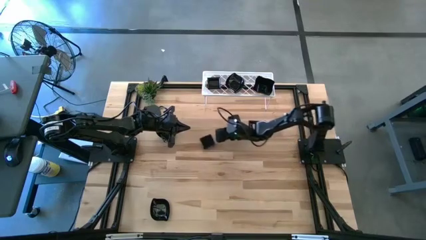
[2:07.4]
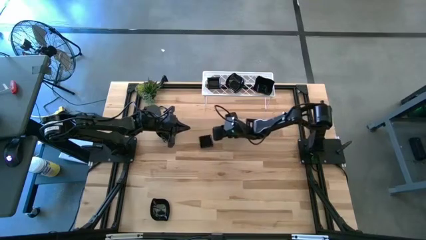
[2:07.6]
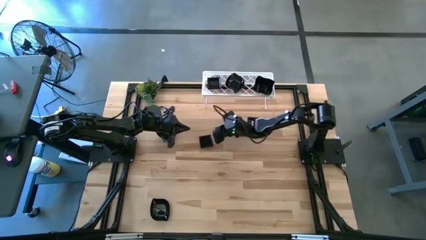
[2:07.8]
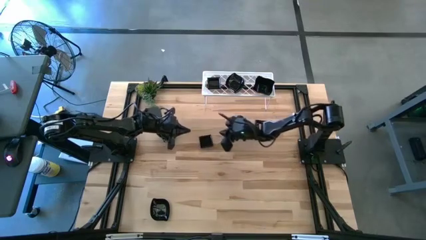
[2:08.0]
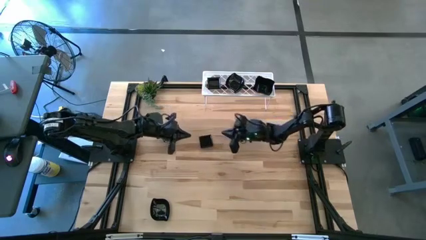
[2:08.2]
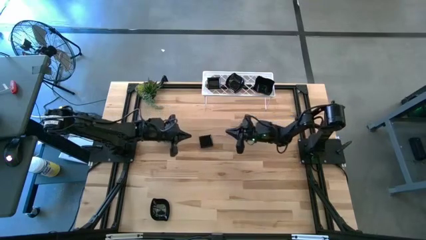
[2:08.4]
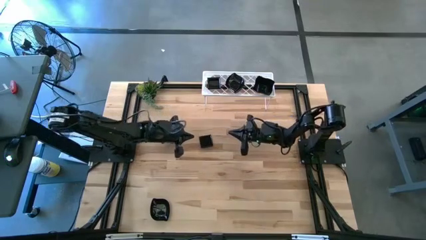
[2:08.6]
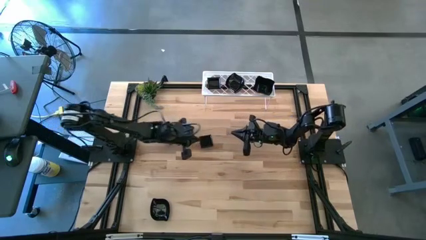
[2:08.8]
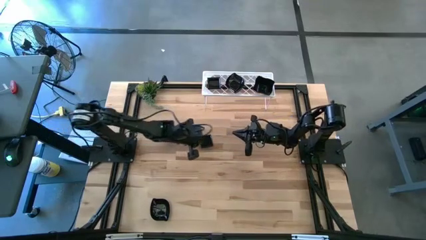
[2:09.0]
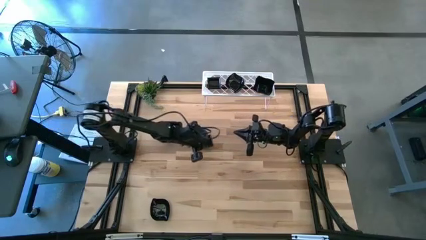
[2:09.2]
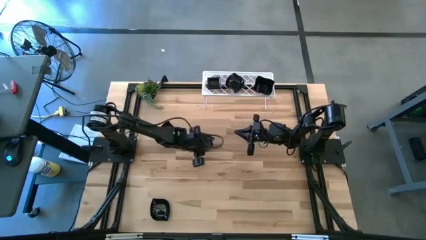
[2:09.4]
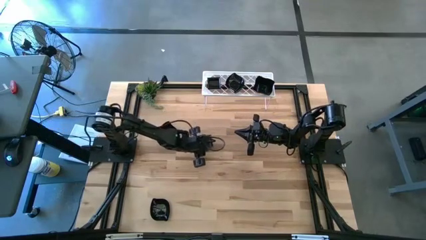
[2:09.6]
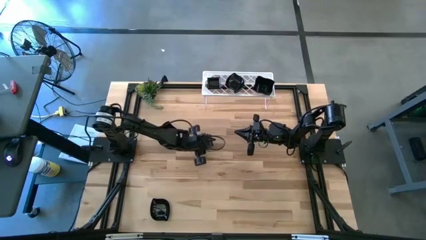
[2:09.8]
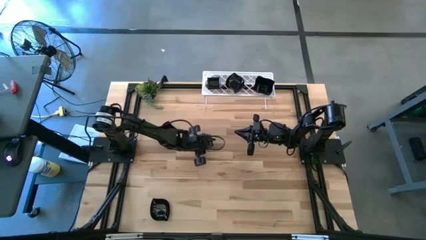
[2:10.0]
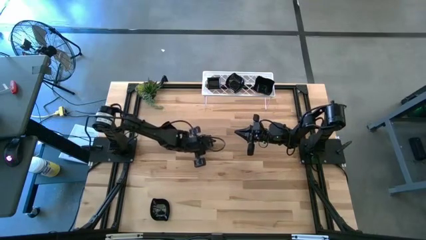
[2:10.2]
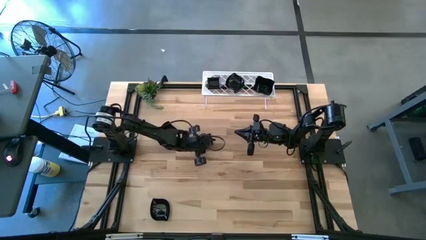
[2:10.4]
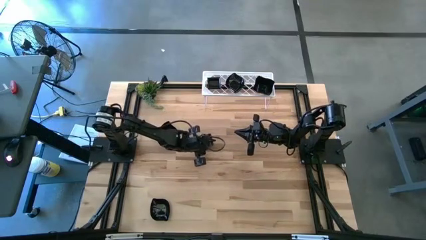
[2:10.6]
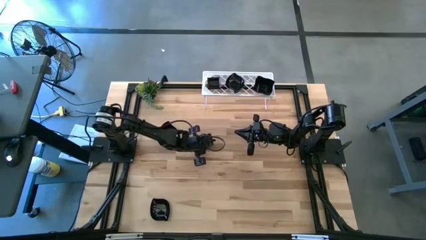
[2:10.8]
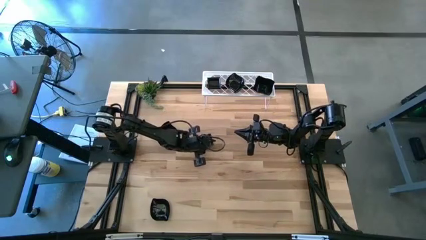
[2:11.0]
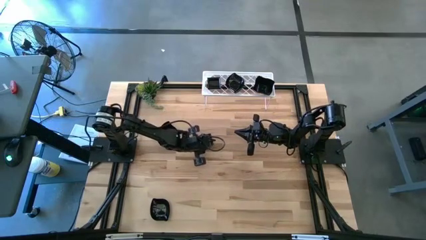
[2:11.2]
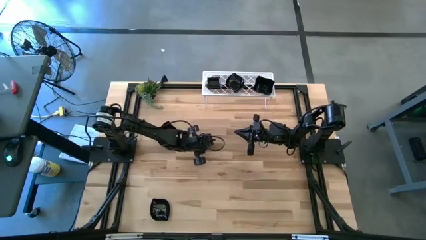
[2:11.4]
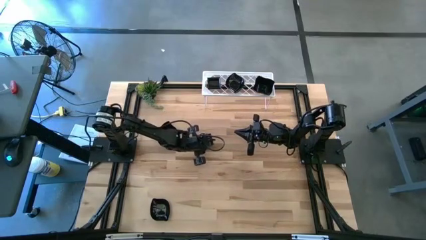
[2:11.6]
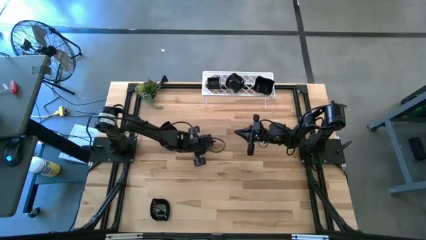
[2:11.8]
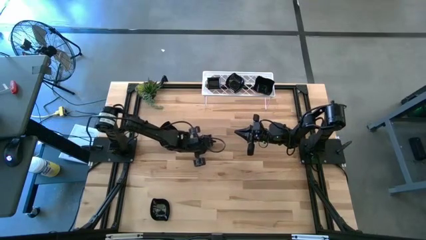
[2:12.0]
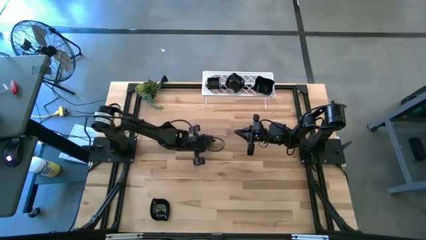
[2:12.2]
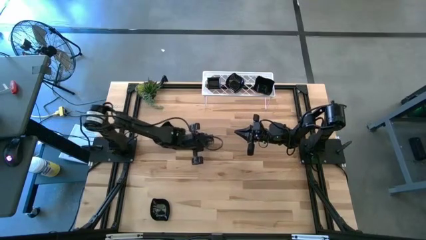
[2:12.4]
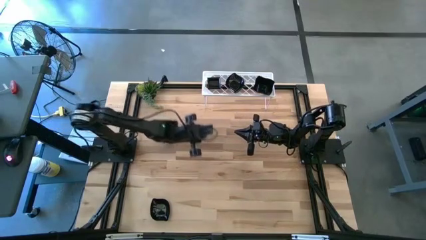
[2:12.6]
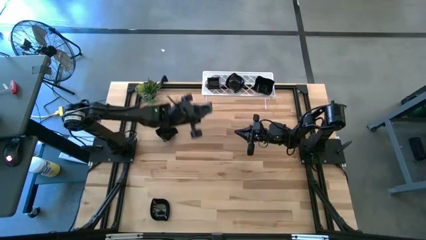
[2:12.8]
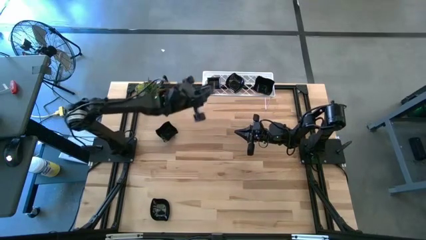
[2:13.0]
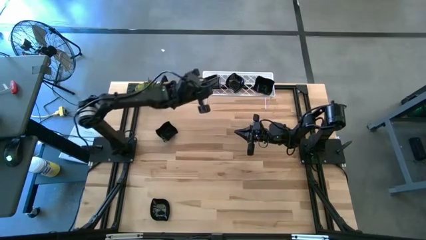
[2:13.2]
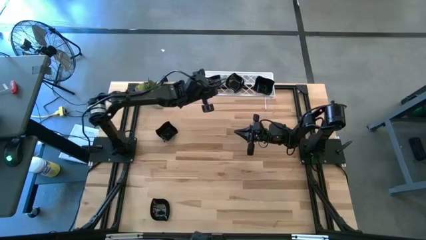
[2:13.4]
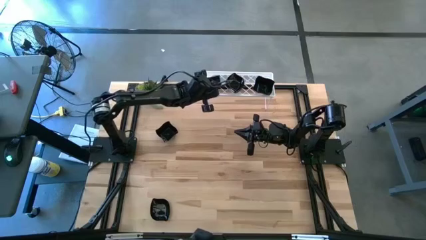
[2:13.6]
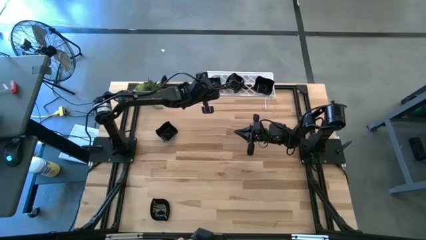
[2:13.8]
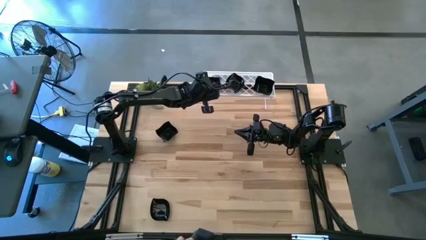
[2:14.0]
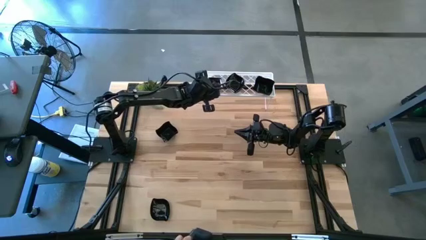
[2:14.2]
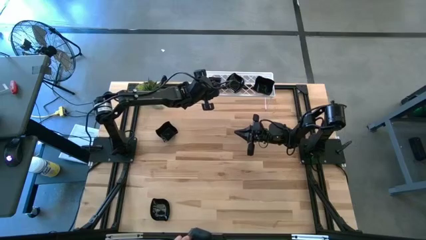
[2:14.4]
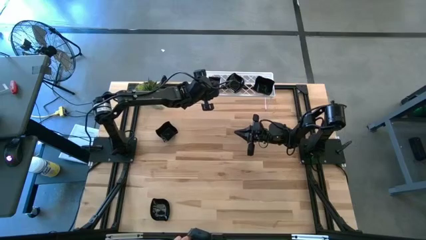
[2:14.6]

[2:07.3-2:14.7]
Task: Pick & Place Mini shaped plates
Stack the square plate on top of the stacked square plates on the shelf

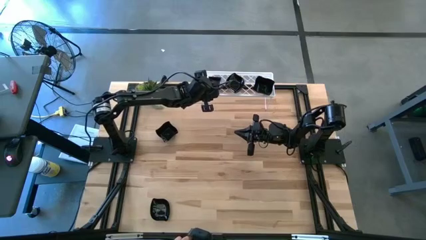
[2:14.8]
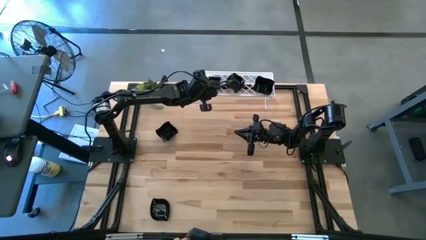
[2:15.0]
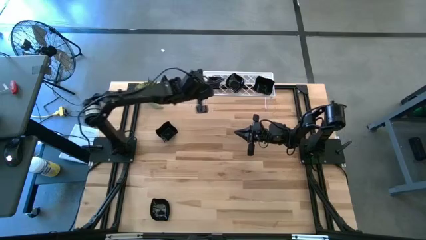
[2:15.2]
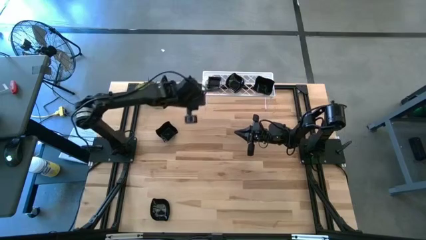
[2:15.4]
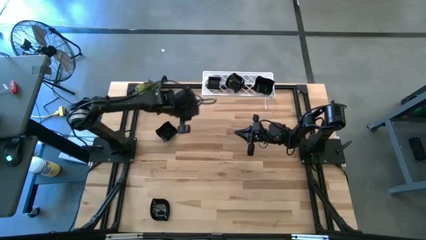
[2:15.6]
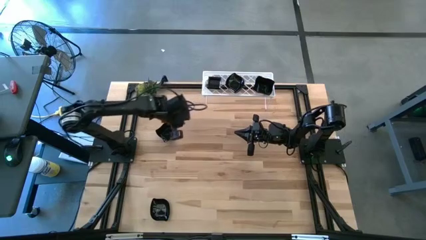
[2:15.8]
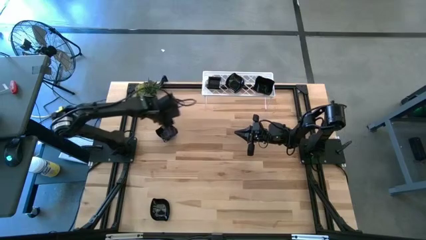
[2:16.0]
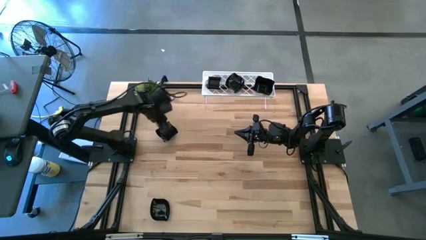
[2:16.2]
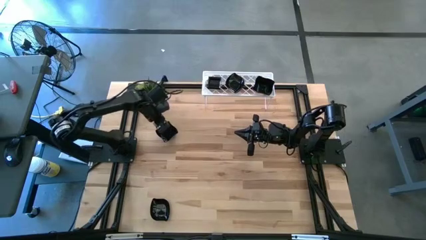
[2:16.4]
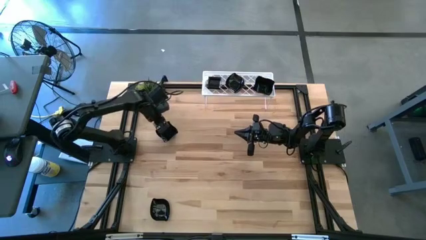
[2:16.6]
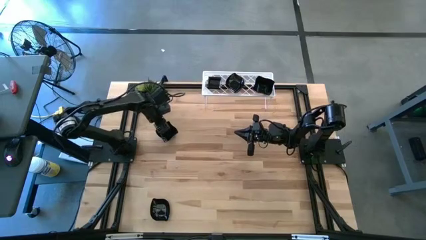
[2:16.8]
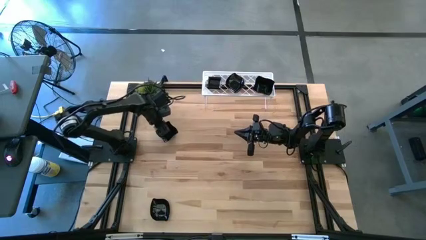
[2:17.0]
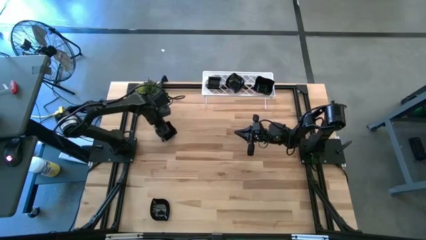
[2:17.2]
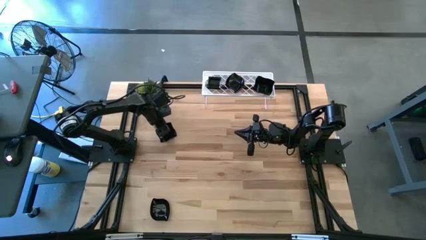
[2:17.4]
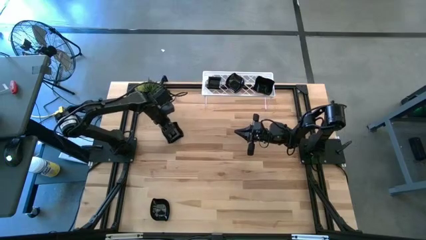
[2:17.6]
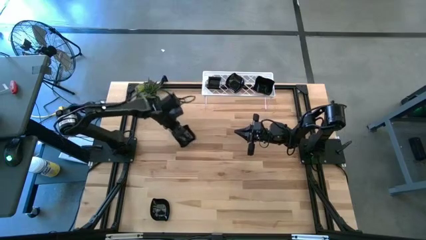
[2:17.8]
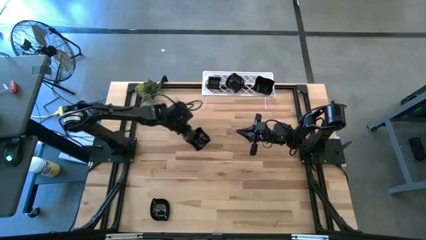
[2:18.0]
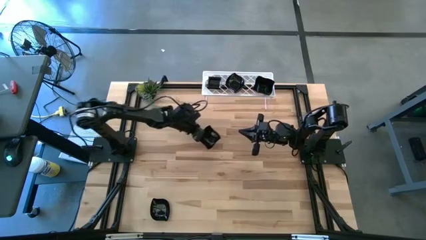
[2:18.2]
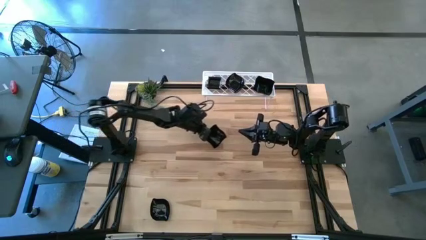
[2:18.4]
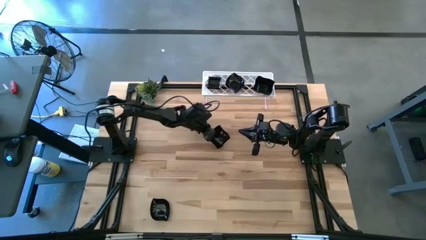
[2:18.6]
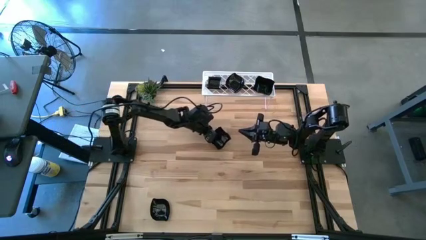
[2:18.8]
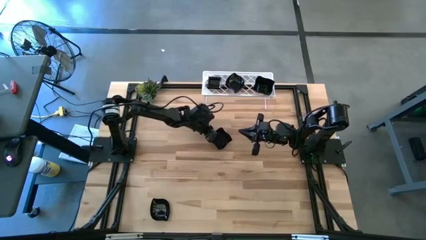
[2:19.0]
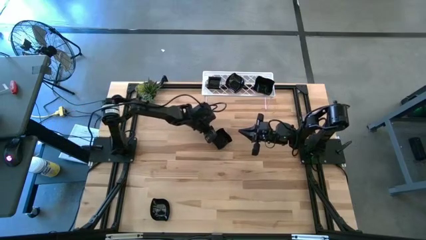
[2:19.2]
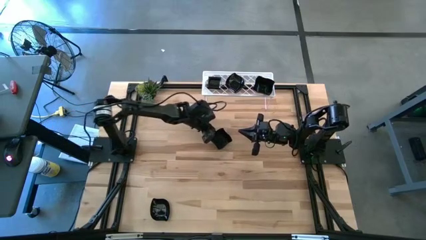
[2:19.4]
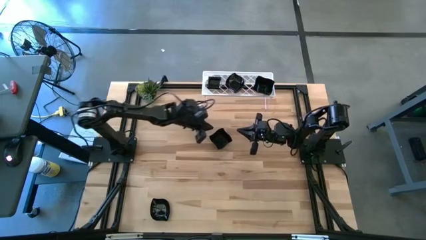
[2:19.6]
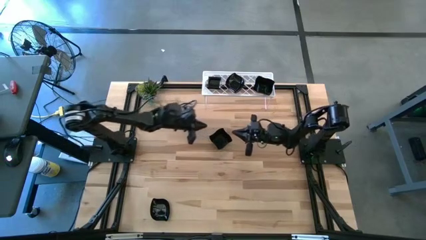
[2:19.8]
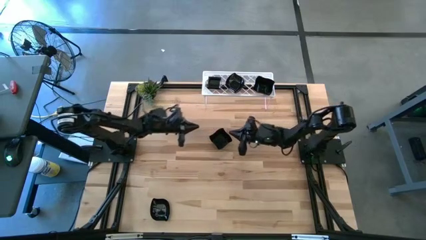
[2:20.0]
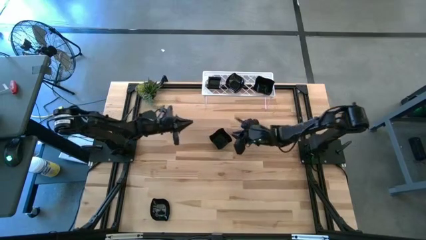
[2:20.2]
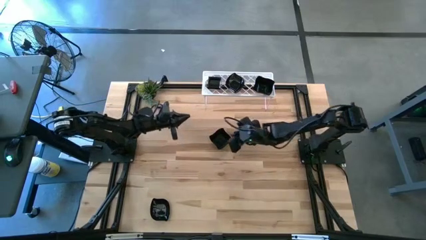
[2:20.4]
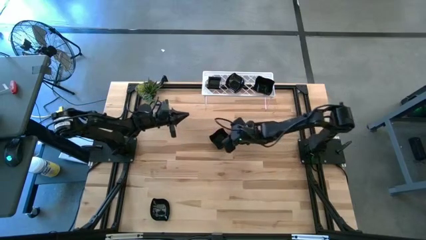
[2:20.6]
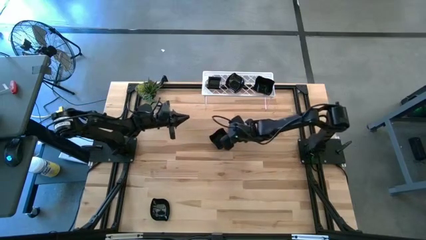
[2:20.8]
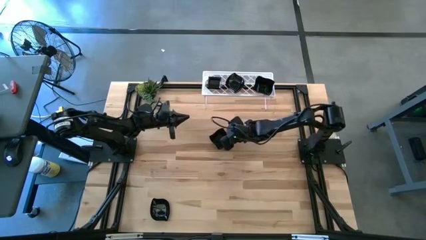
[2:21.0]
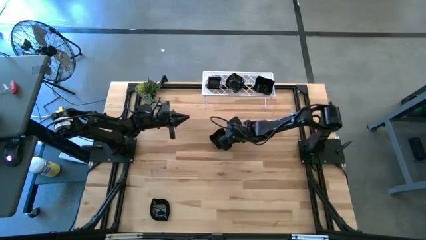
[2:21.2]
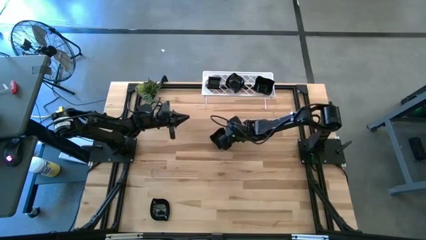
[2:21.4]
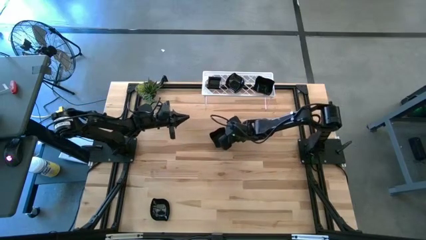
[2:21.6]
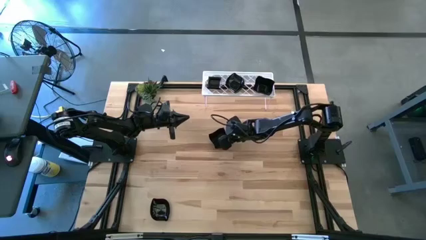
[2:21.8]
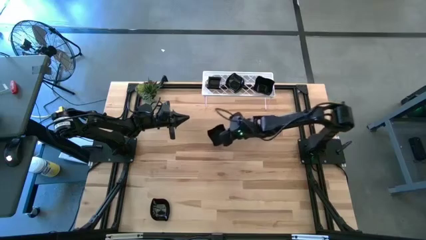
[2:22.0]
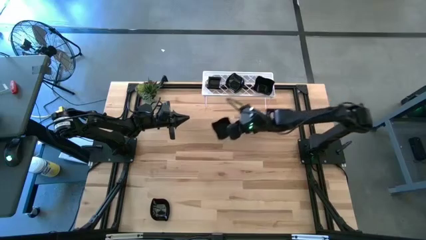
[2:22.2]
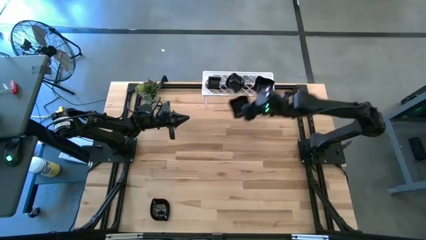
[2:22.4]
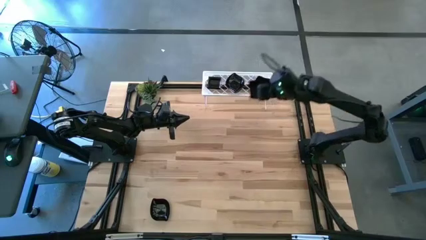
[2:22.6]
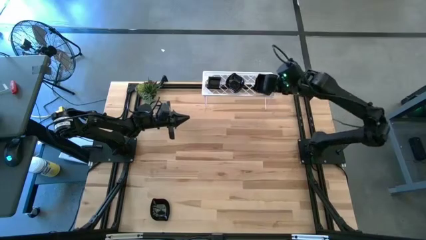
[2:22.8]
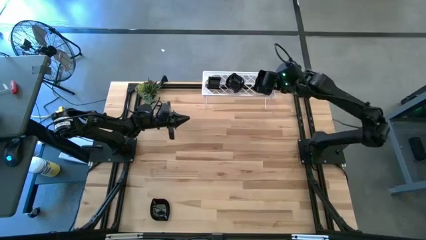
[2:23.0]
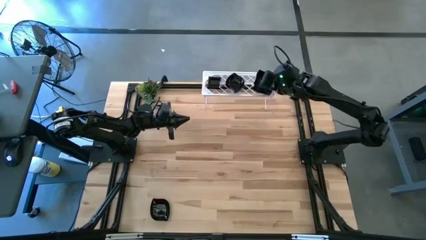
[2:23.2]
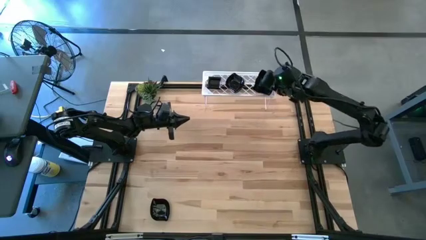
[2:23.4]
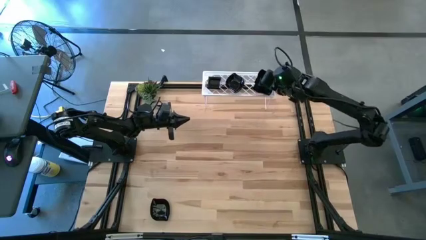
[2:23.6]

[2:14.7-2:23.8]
Stack the distorted square plate on top of the stacked distorted square plates on the shelf
